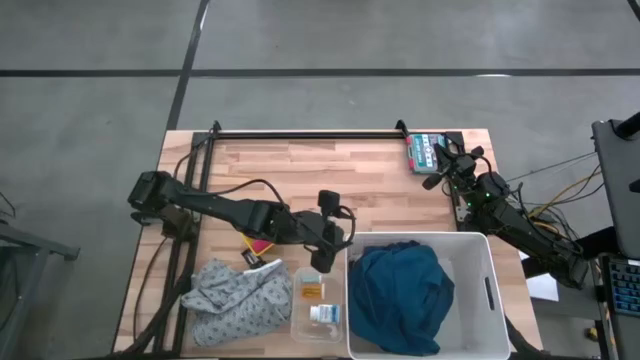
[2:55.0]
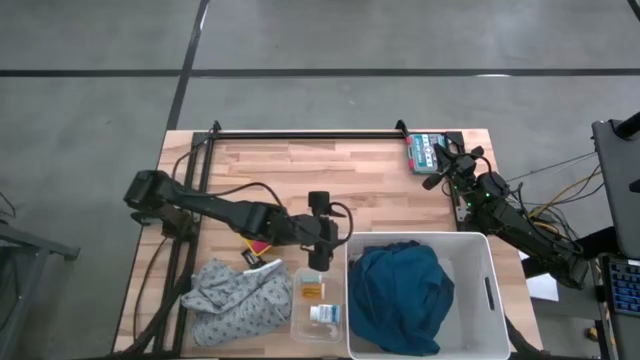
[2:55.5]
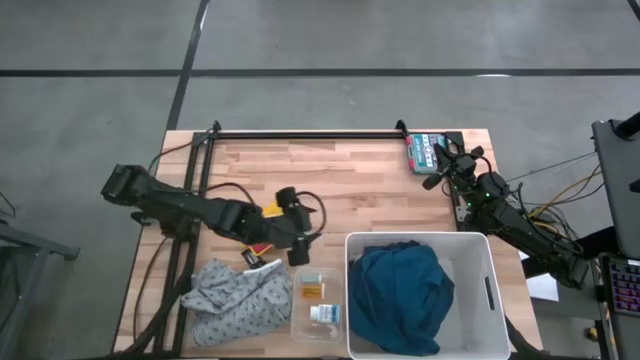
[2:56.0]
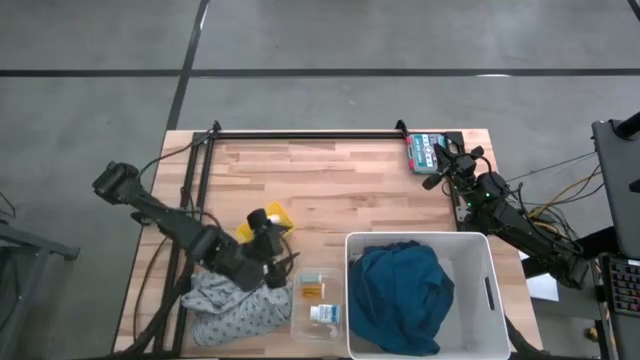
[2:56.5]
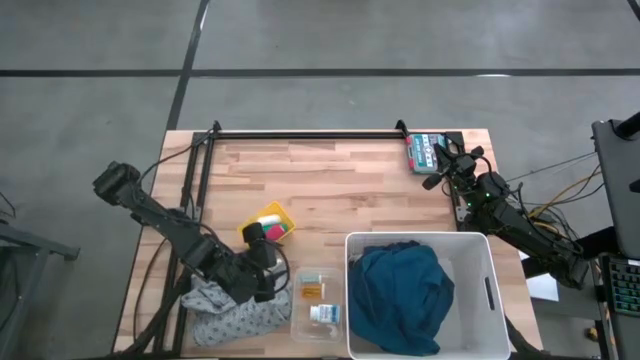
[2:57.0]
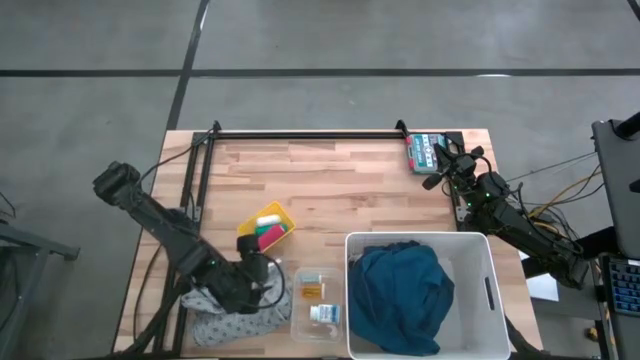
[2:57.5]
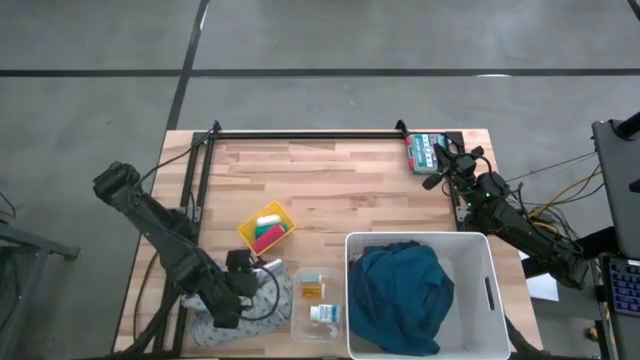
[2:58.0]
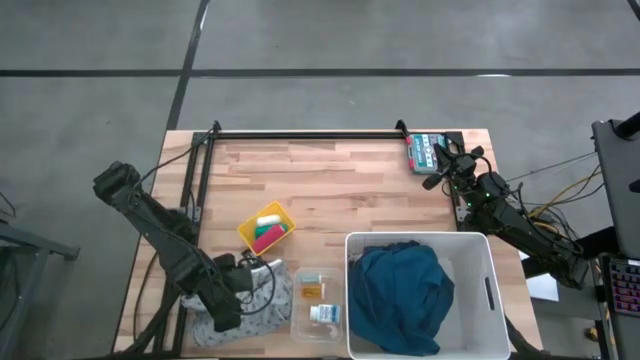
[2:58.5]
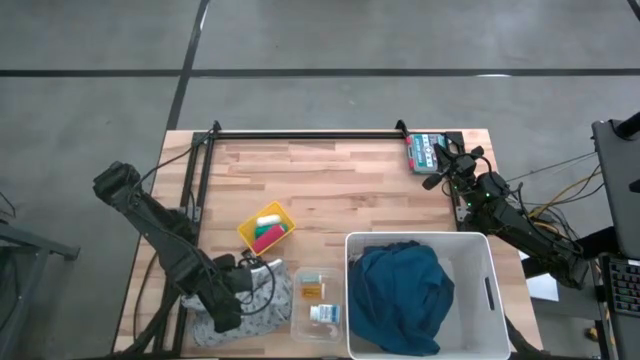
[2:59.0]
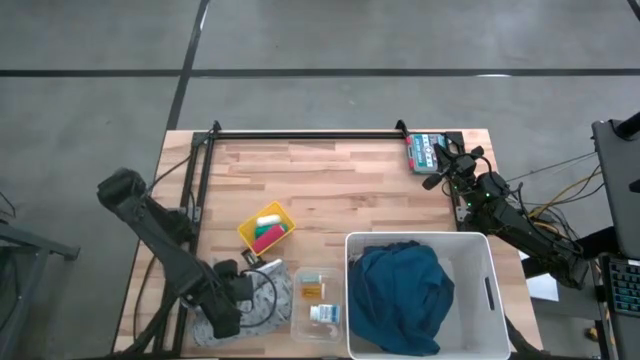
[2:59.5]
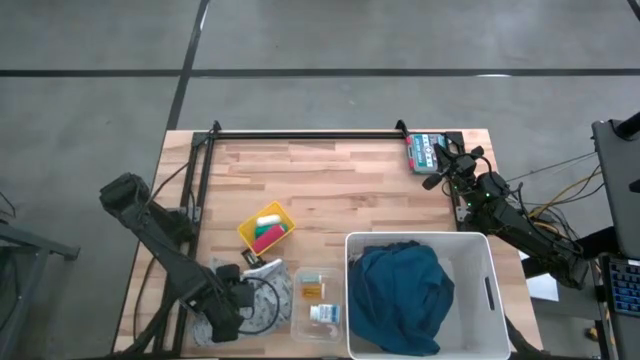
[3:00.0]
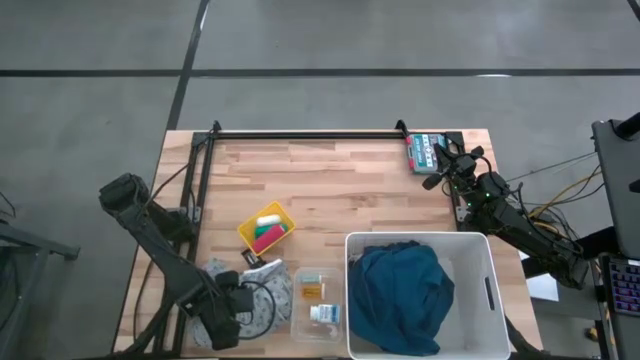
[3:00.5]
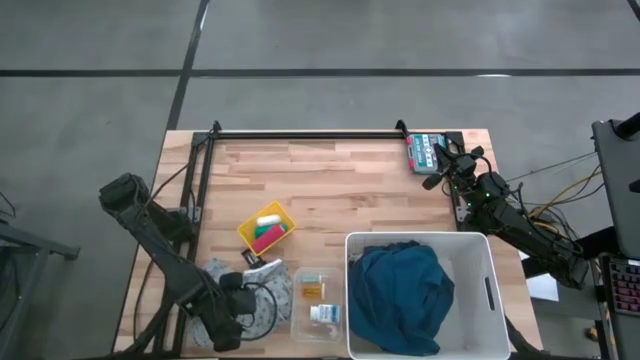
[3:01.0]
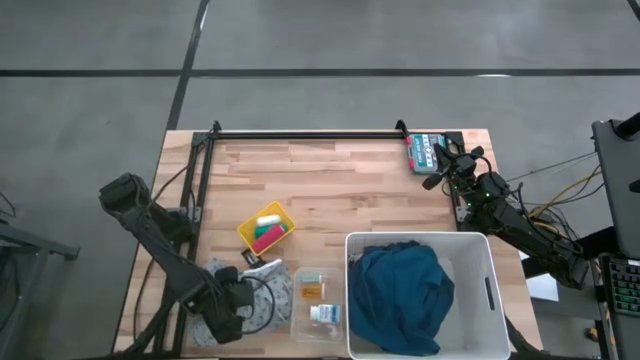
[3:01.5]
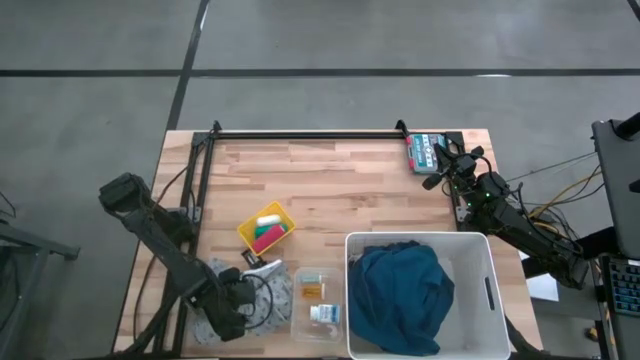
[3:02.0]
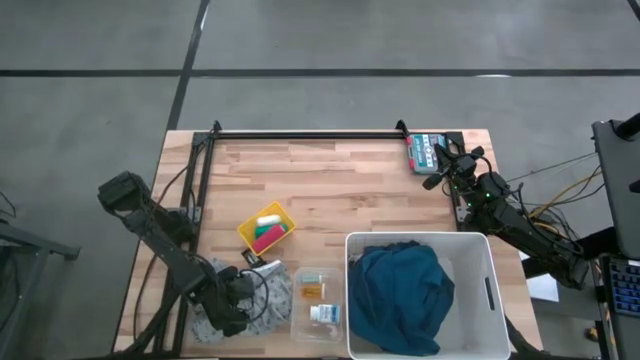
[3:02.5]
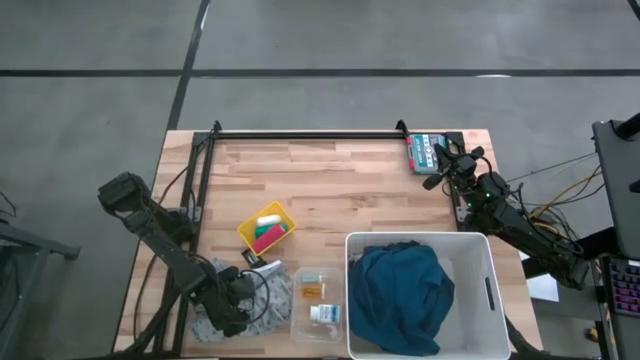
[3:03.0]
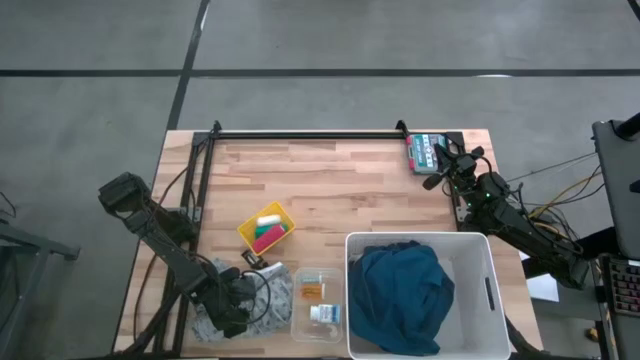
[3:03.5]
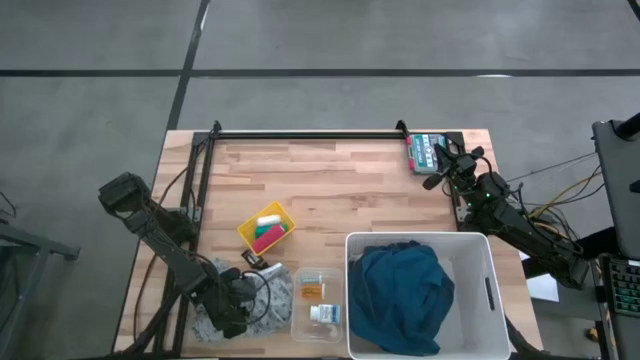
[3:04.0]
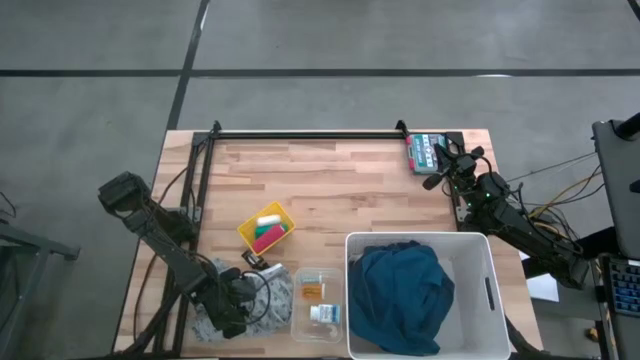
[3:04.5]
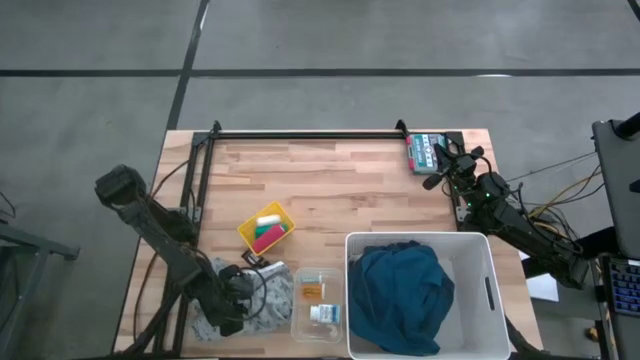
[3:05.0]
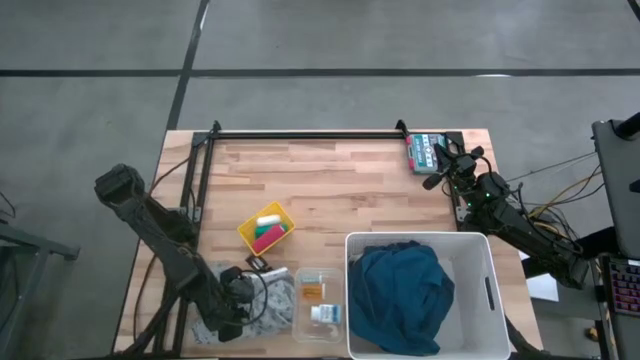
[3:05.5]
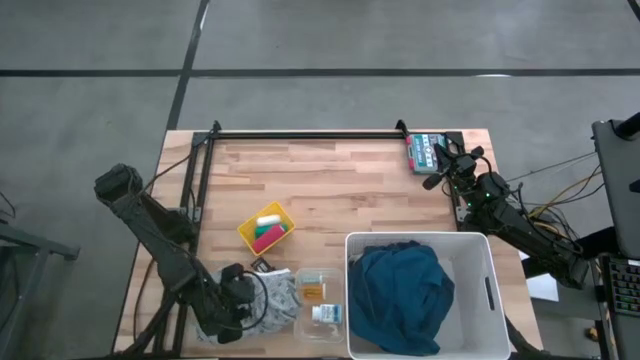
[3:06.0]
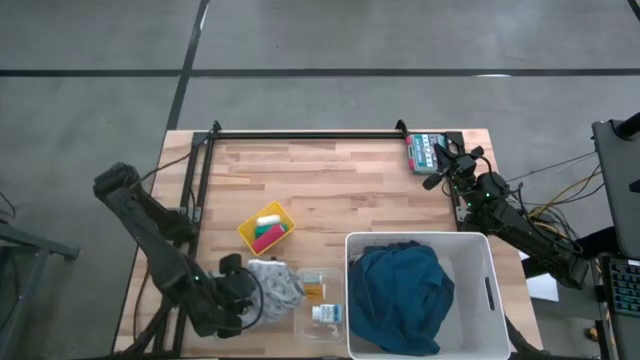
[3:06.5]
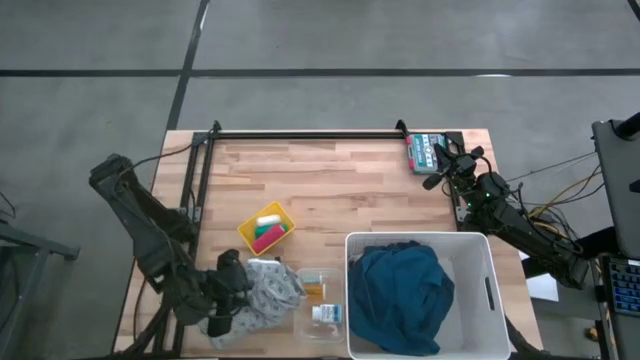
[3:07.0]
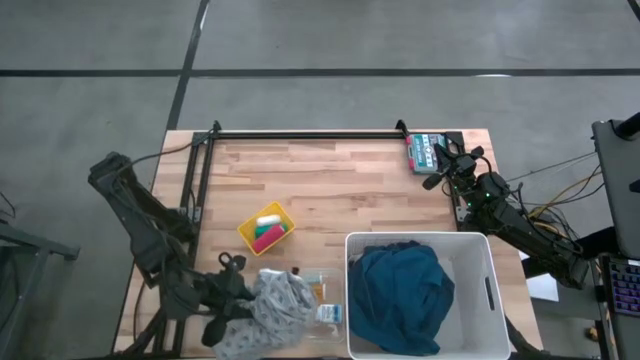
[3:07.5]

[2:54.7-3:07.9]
Task: Pick & Place Medicine items
Put the light blue patient gown into the white laundry bin

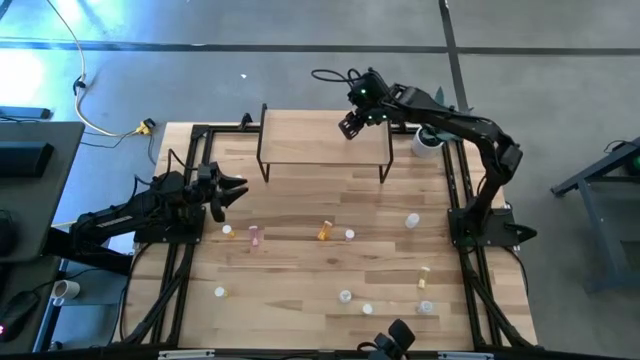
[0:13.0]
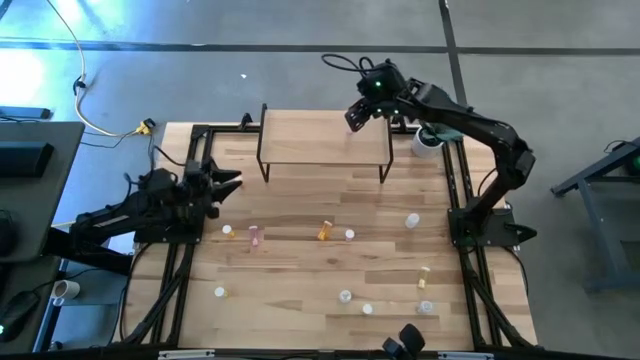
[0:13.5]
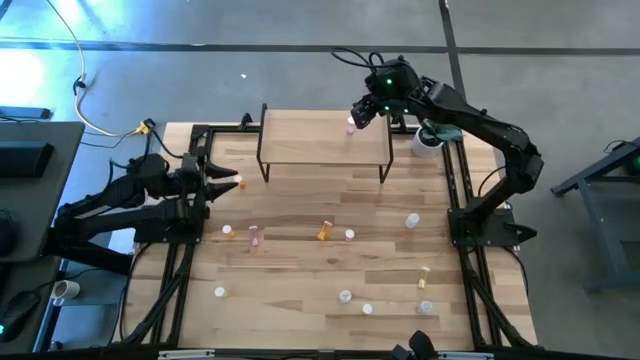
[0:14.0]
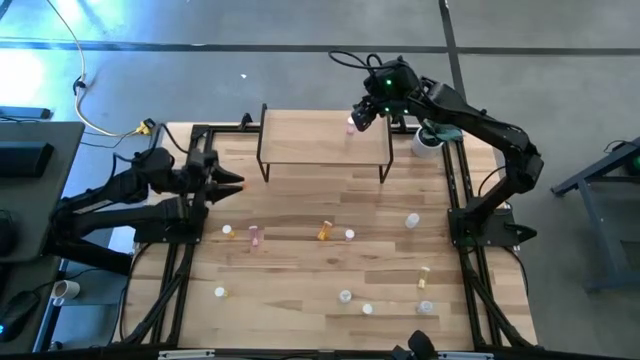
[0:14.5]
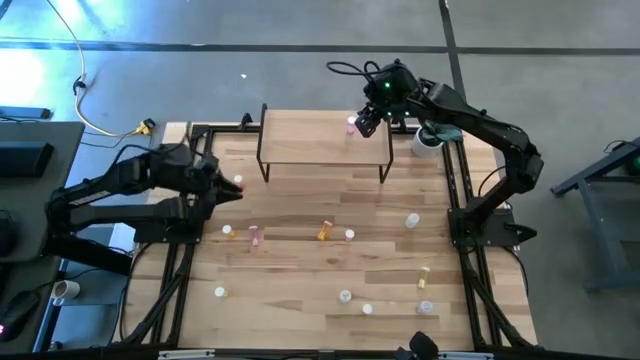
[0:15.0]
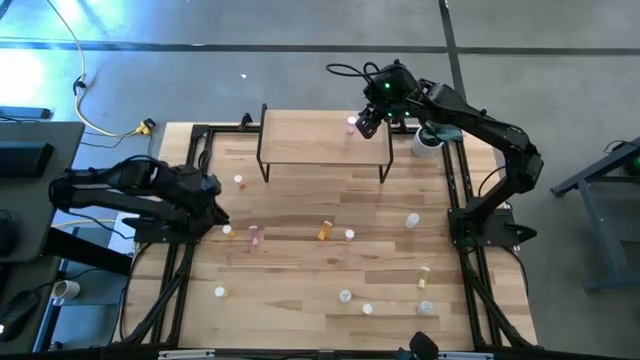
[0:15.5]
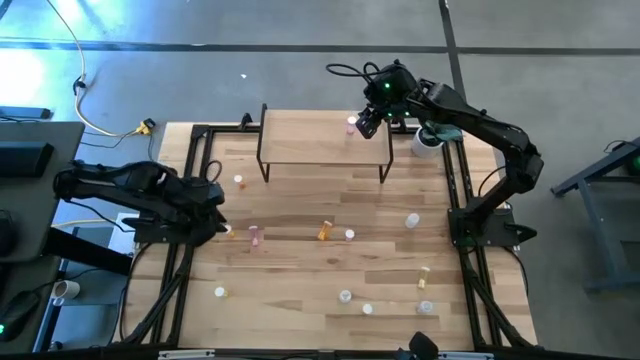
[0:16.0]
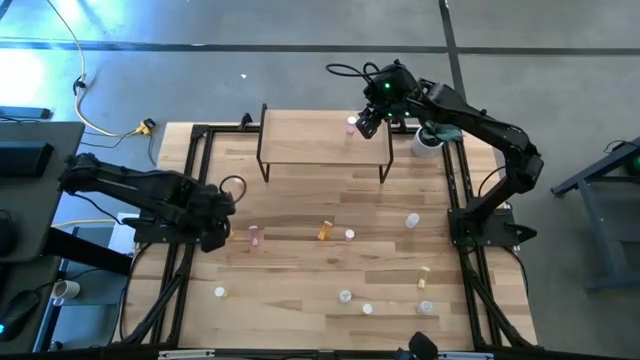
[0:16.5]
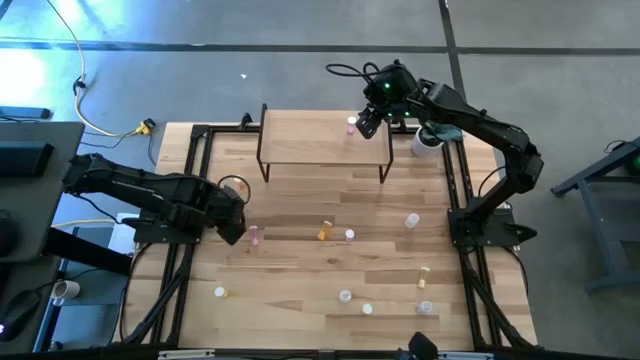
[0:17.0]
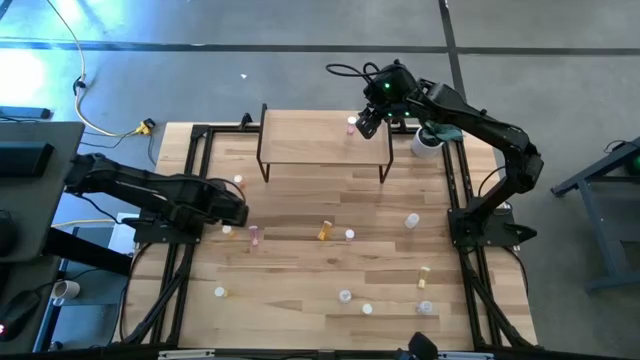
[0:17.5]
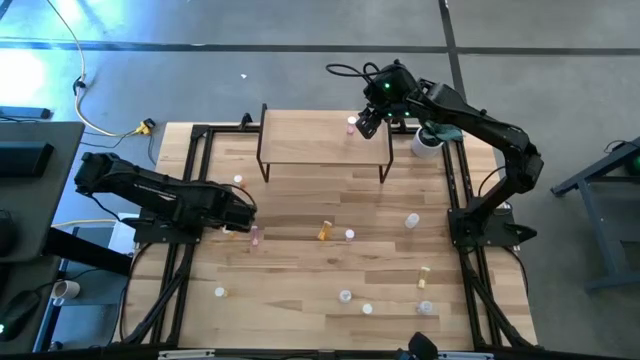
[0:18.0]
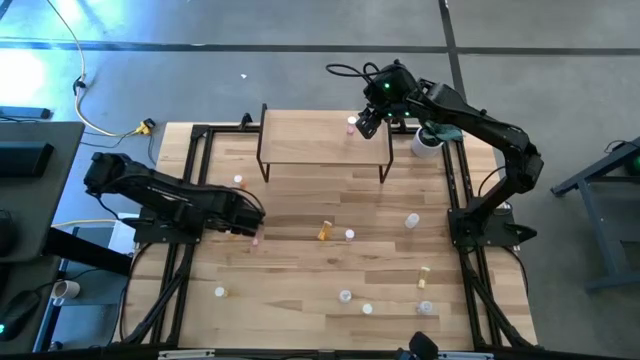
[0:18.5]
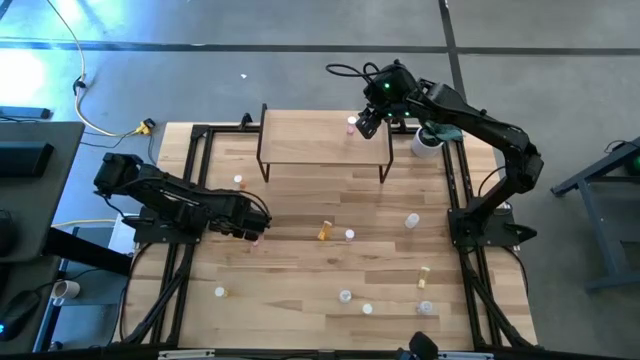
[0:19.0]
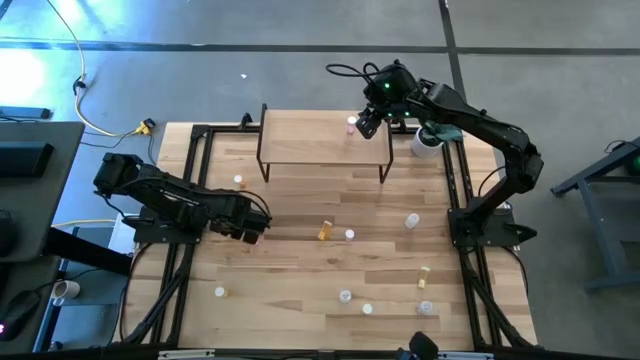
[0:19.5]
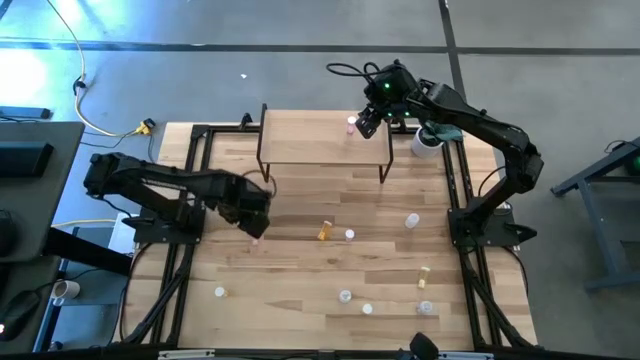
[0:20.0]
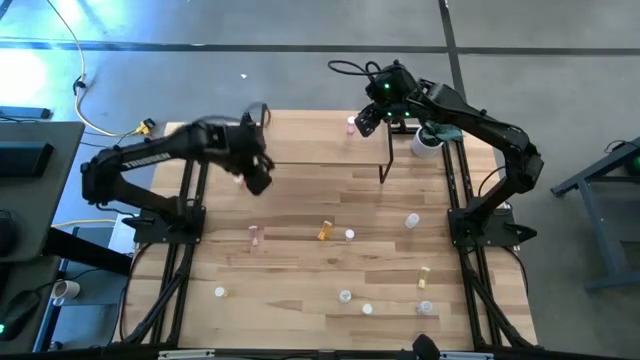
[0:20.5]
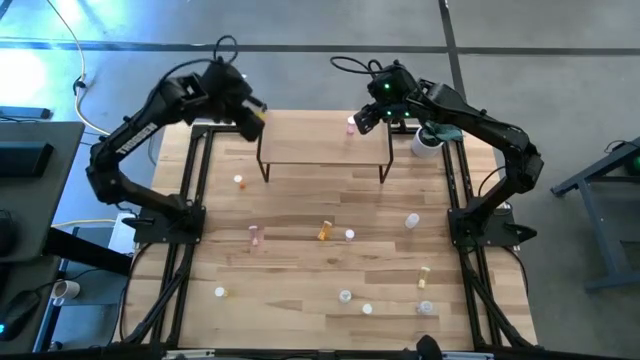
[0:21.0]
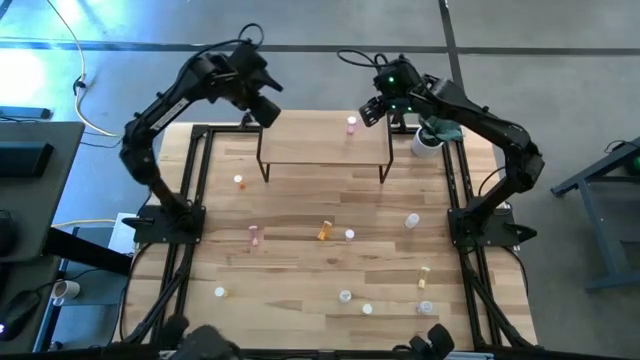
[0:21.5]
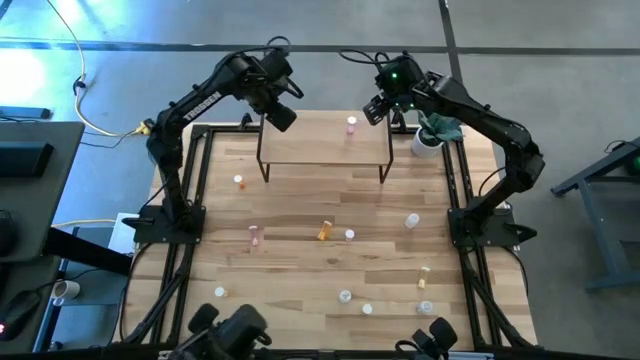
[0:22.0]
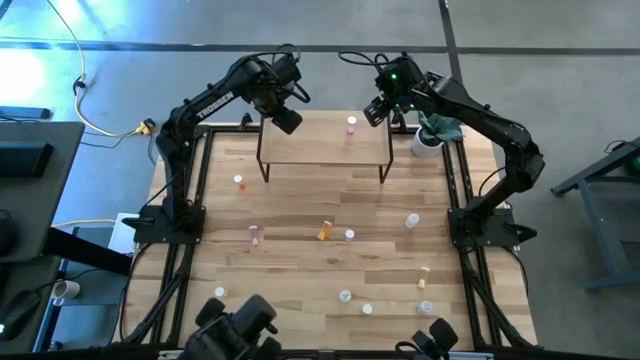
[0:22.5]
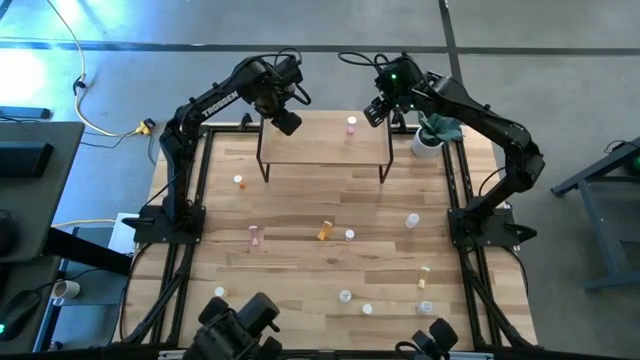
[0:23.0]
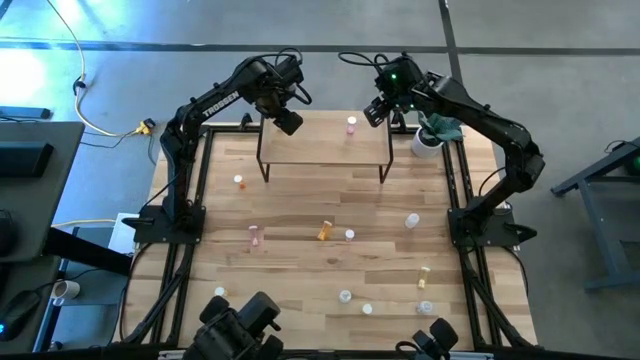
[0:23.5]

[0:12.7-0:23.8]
Task: Pick and place medicine bottles onto shelf by color
Put the bottom left orange pill bottle on the shelf
